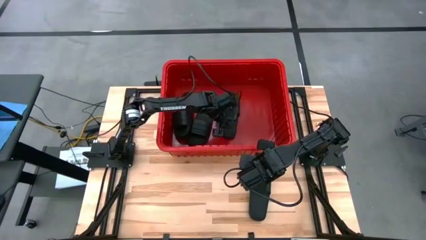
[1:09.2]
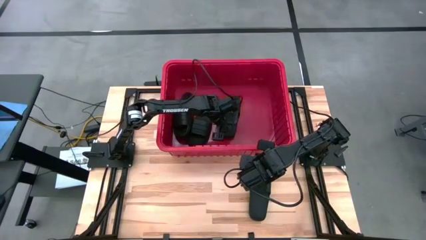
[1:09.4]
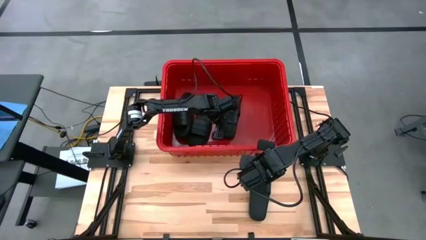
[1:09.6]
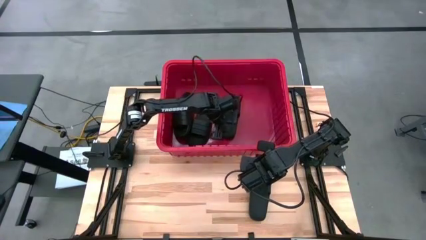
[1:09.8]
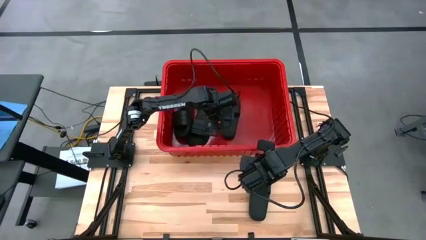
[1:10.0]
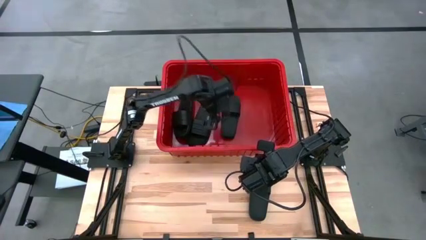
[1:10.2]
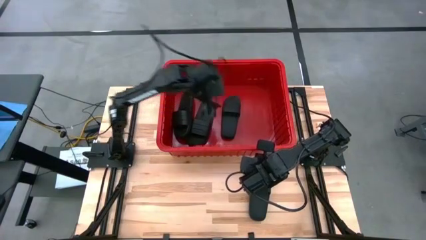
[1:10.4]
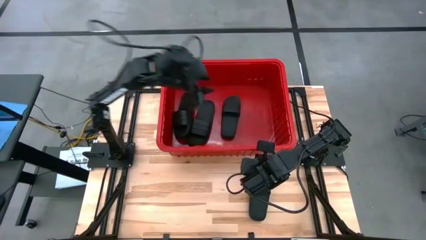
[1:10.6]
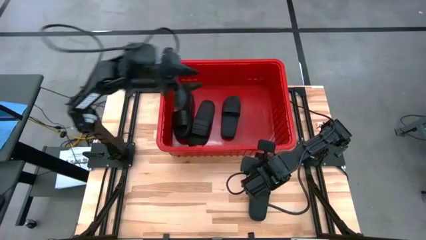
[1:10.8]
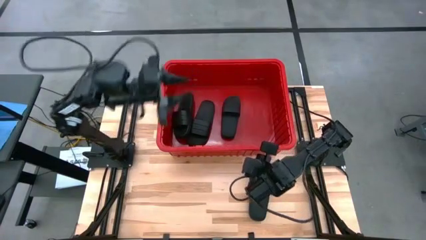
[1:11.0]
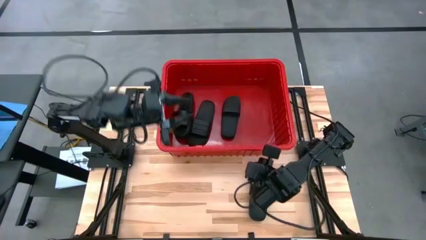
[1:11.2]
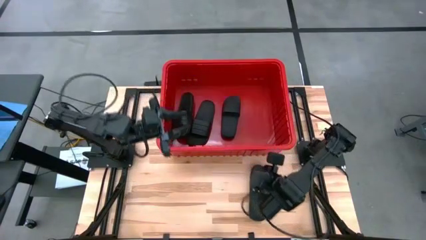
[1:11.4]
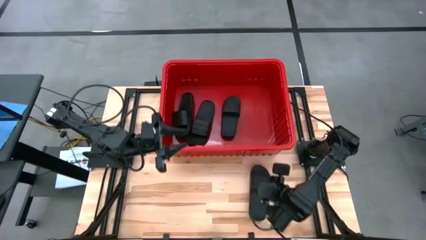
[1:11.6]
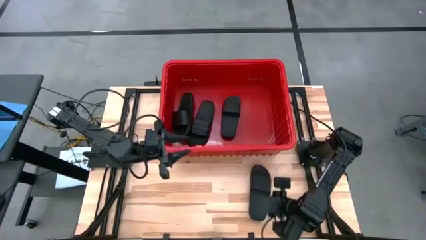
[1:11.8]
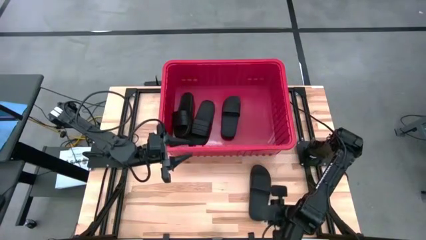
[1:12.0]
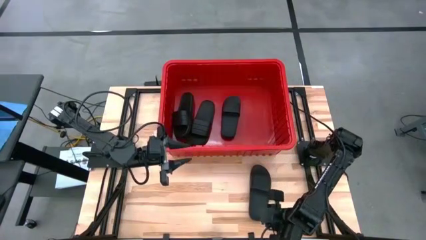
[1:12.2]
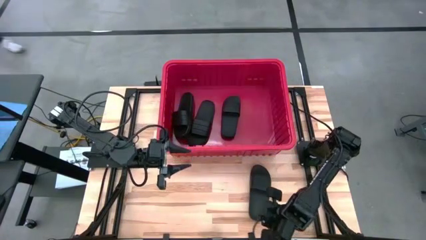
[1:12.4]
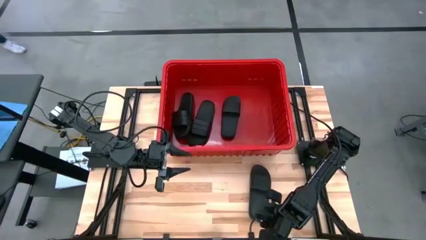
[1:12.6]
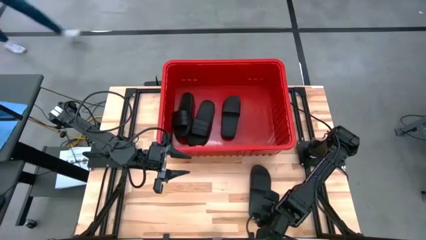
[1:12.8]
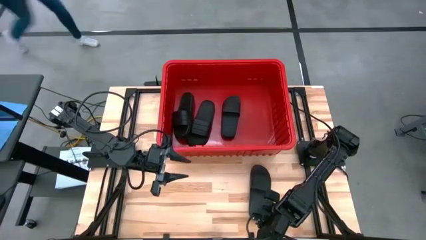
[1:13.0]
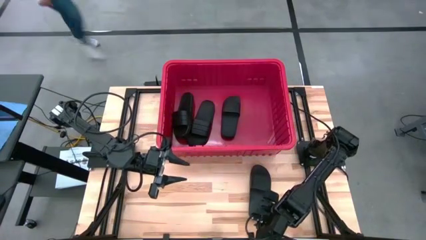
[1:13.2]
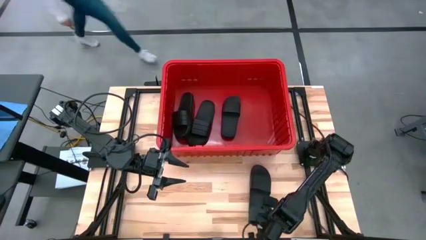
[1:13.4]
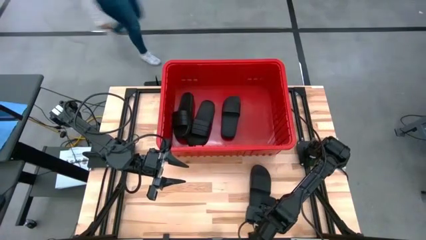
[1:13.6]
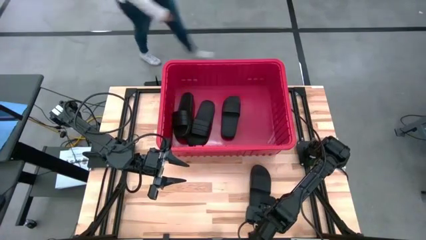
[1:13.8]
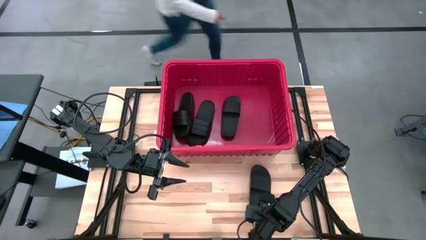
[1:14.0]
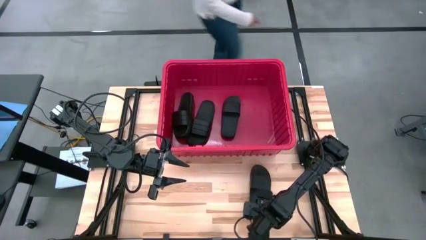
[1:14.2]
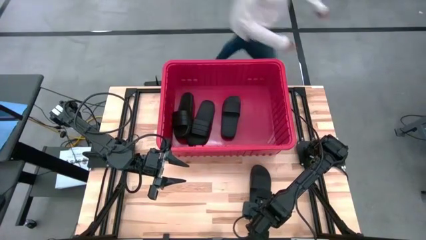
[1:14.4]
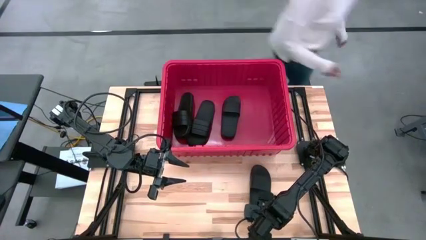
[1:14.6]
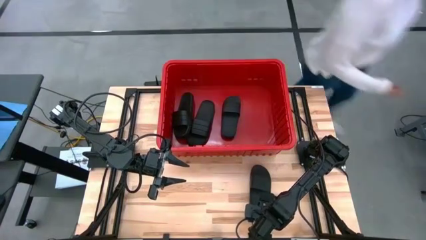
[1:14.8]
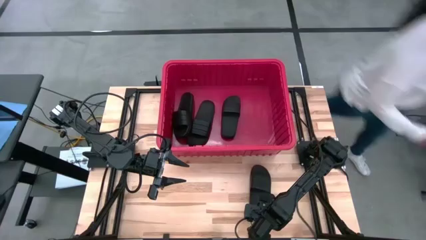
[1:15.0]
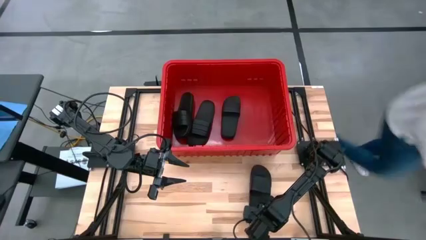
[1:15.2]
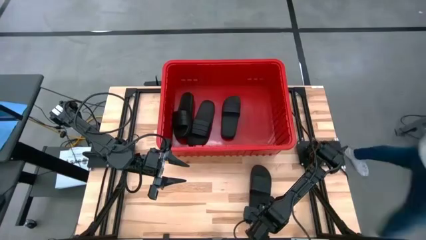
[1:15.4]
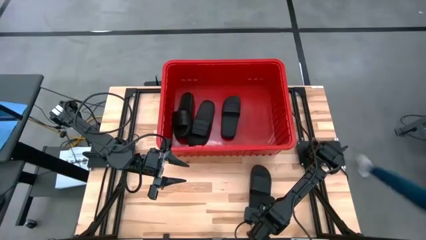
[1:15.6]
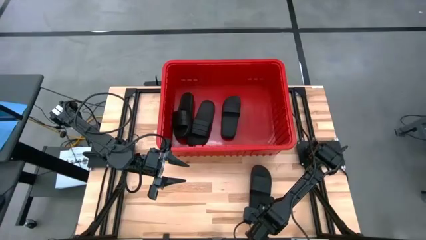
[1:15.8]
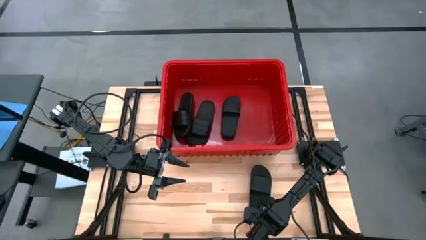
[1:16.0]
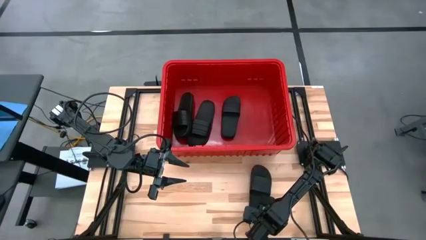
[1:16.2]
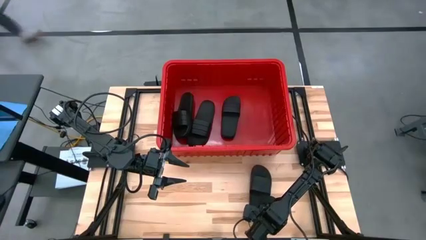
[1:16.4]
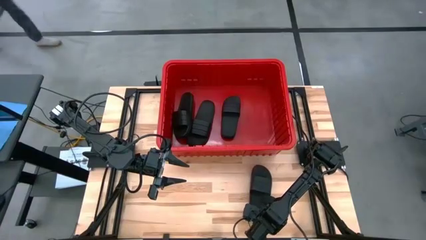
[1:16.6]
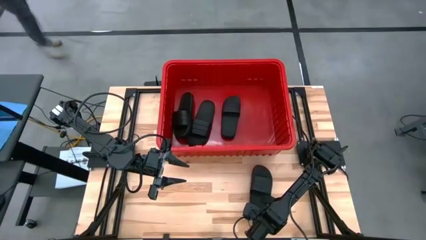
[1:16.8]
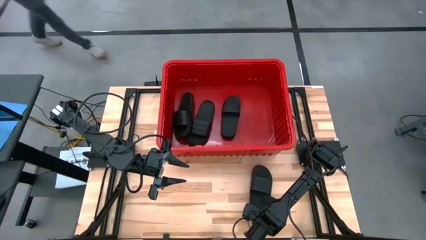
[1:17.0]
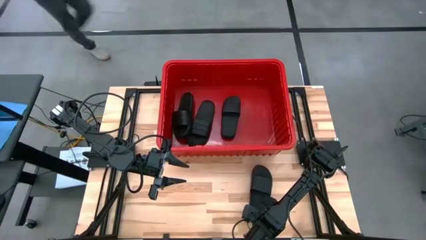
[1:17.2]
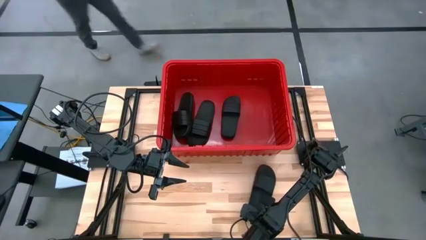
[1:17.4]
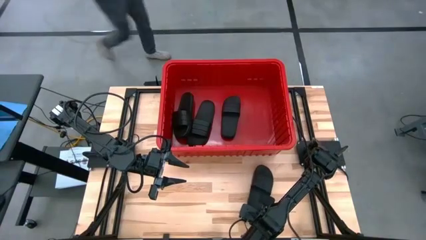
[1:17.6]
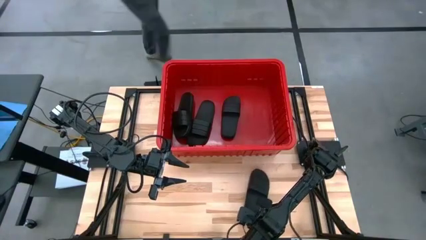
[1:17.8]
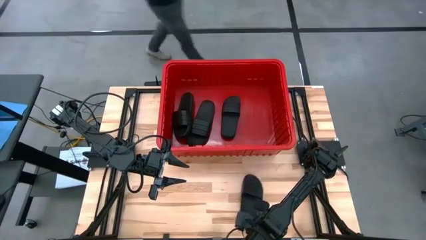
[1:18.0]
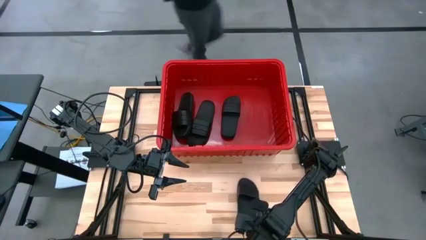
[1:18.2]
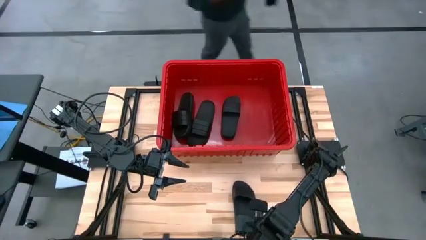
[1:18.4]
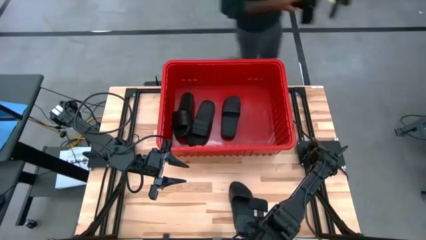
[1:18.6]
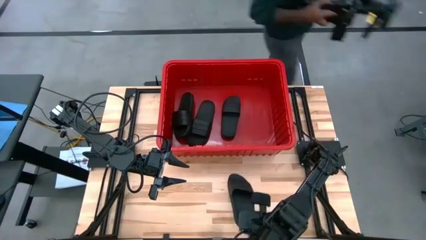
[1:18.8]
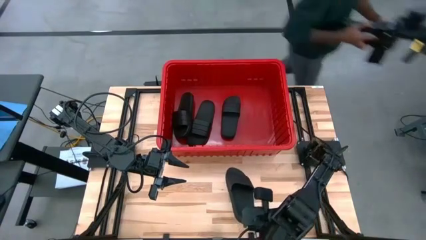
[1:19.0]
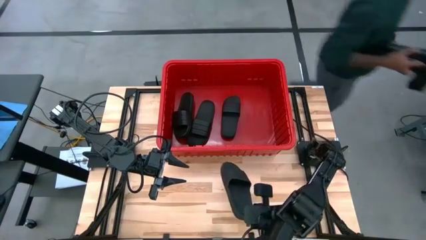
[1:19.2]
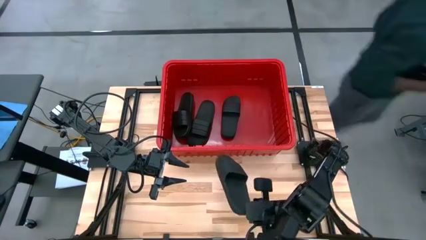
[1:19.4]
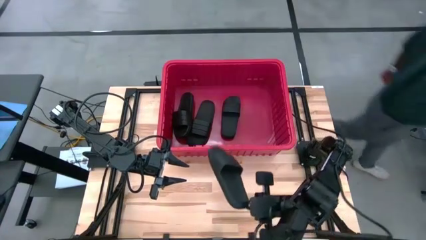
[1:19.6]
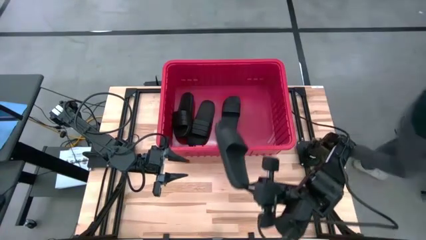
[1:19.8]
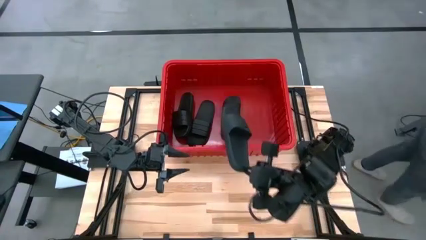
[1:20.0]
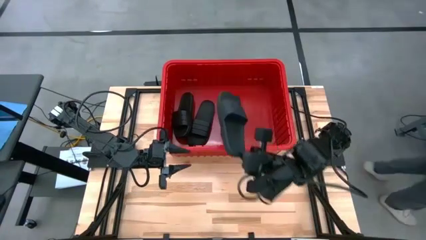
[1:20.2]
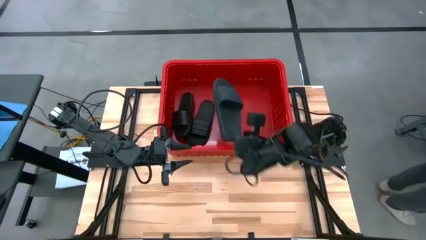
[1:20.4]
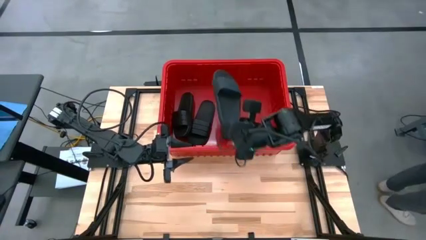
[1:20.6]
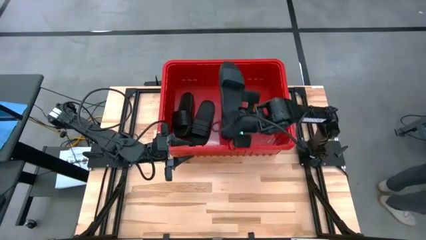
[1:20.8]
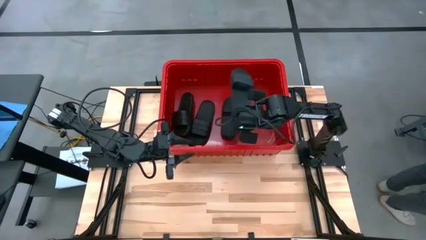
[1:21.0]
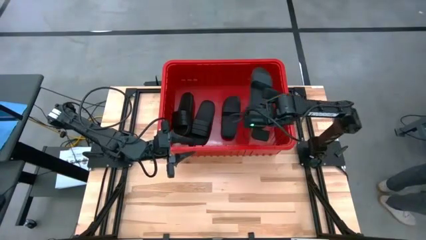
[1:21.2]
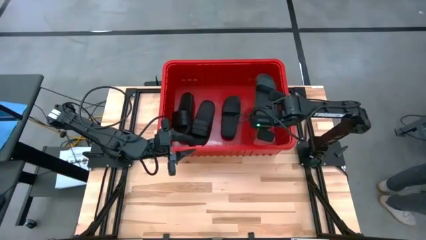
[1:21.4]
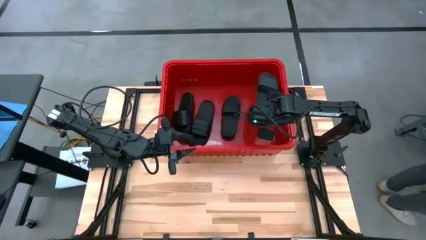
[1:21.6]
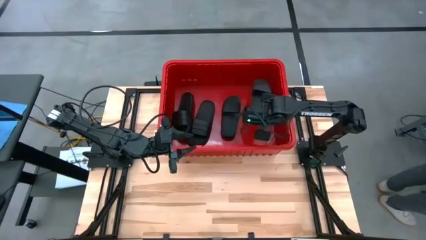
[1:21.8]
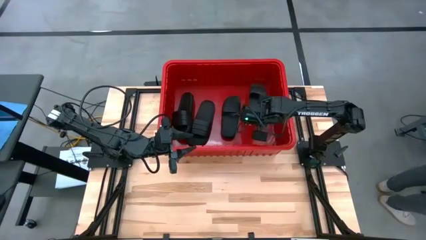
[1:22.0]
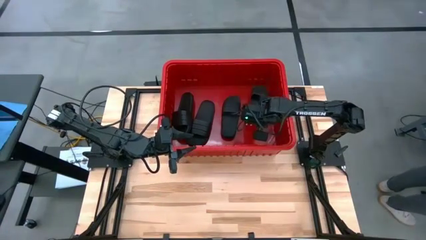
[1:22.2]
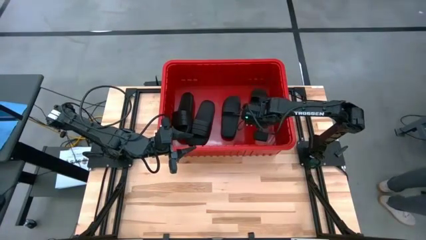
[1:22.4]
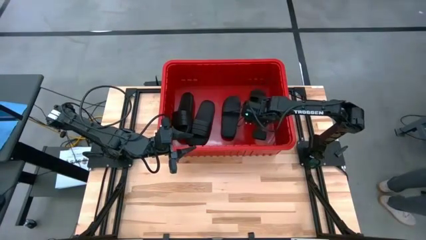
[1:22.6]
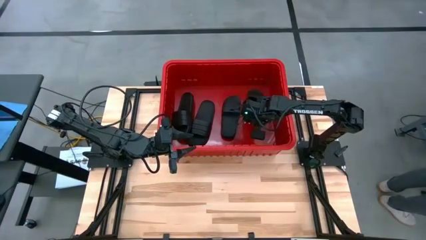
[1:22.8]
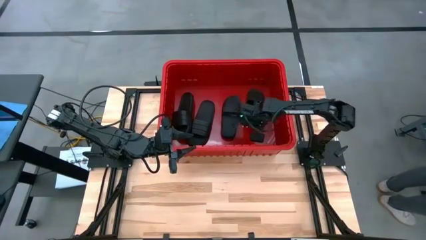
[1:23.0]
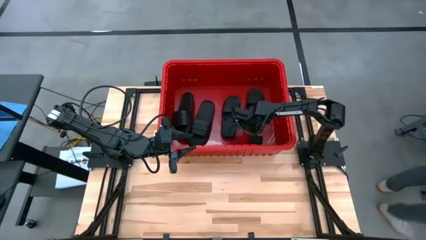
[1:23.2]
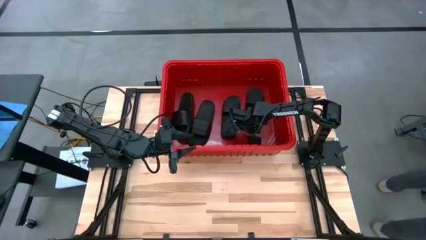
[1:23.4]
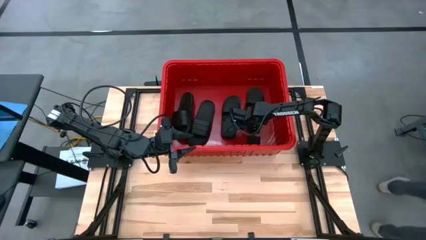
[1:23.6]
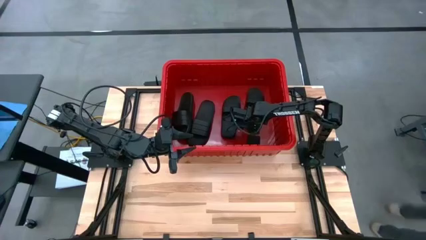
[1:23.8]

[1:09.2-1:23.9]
Task: Pick and place slides into bin
Put the black slide into the red bin
